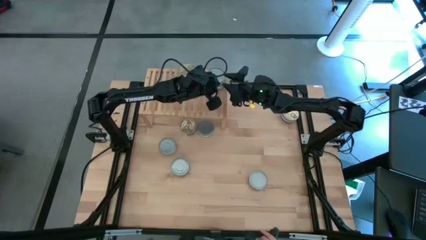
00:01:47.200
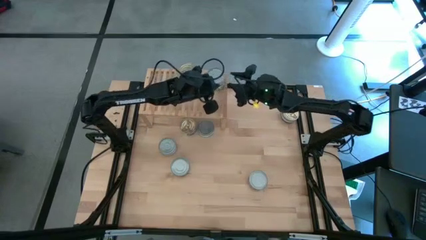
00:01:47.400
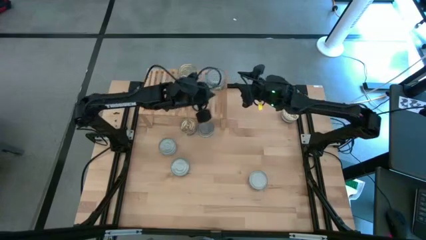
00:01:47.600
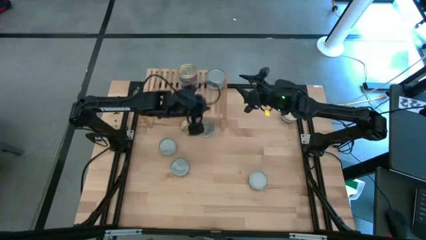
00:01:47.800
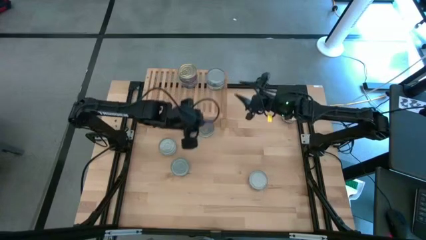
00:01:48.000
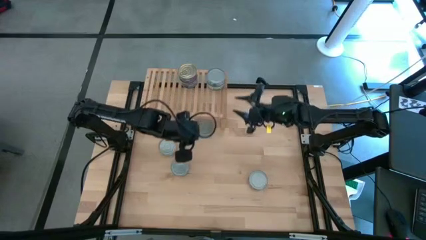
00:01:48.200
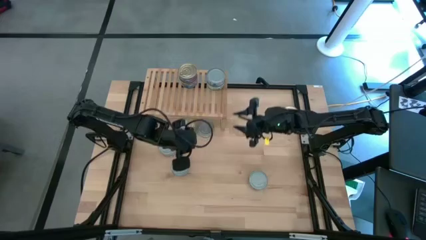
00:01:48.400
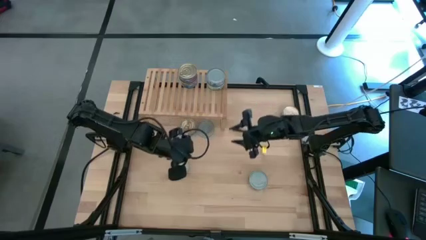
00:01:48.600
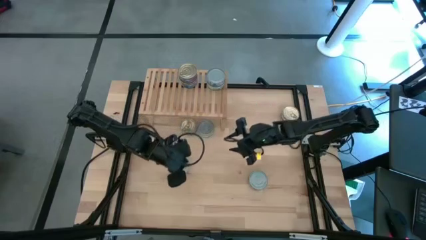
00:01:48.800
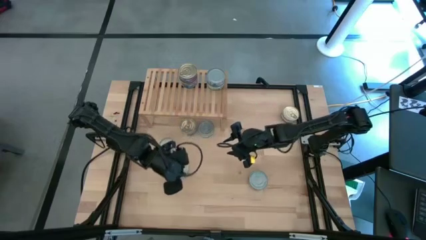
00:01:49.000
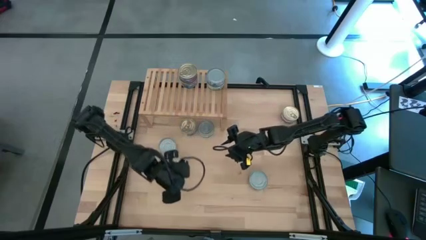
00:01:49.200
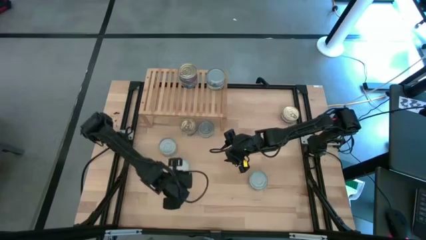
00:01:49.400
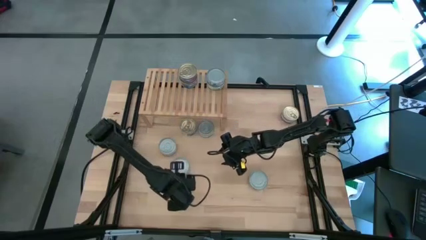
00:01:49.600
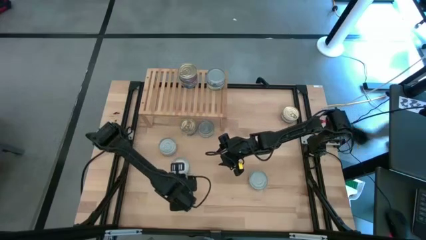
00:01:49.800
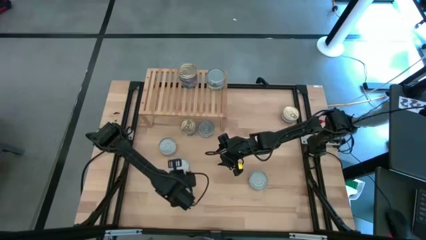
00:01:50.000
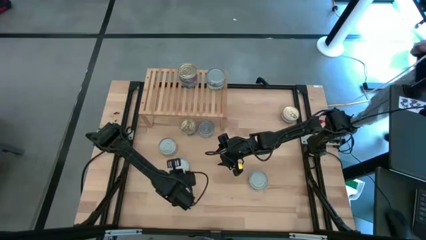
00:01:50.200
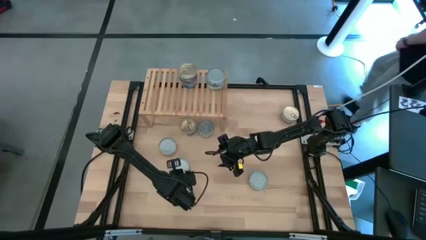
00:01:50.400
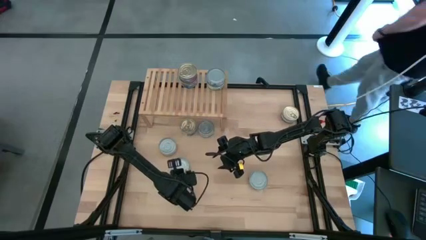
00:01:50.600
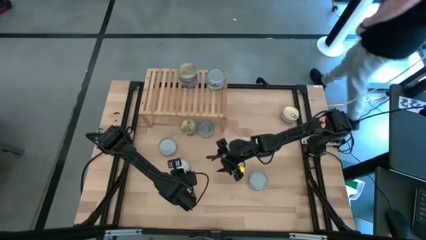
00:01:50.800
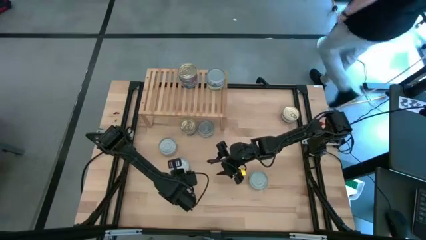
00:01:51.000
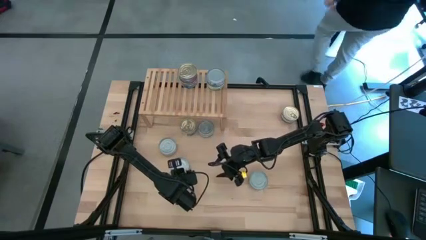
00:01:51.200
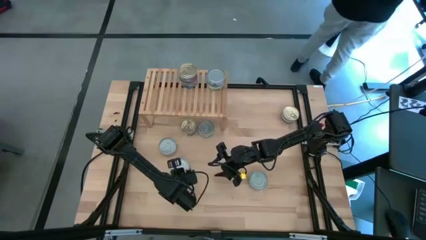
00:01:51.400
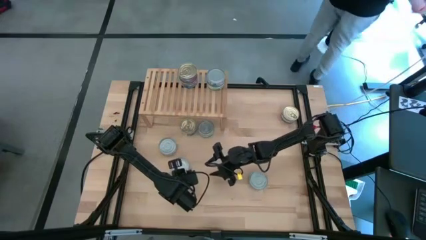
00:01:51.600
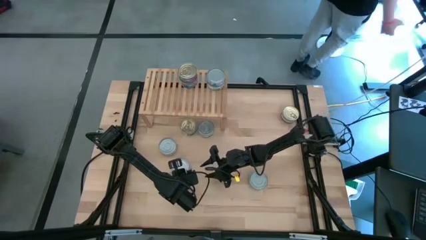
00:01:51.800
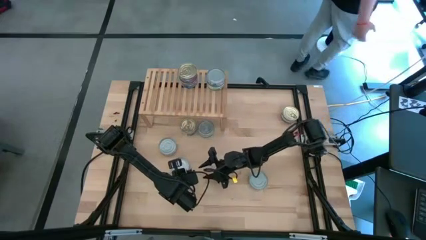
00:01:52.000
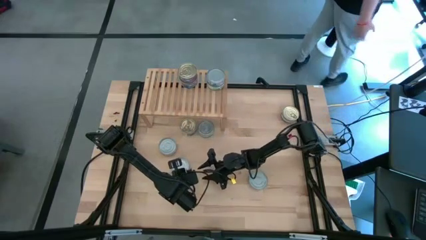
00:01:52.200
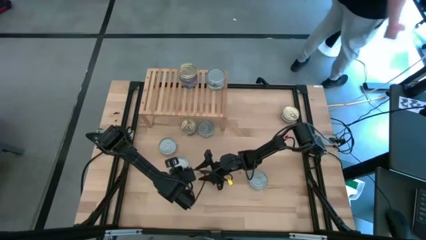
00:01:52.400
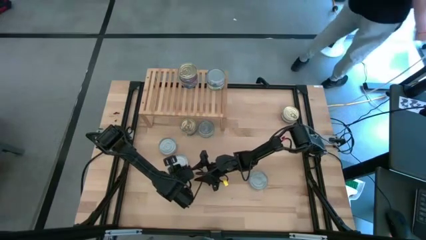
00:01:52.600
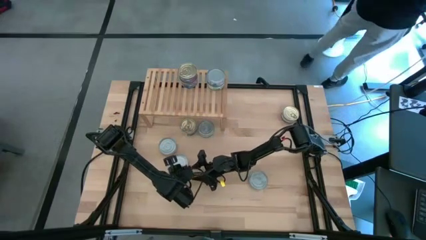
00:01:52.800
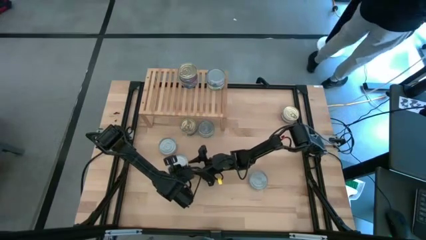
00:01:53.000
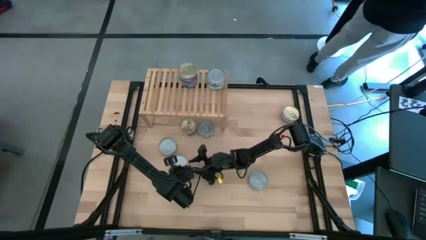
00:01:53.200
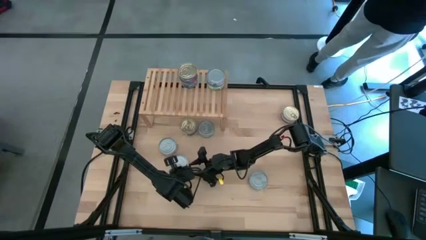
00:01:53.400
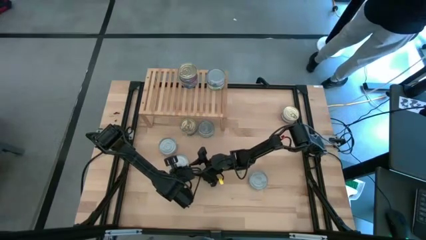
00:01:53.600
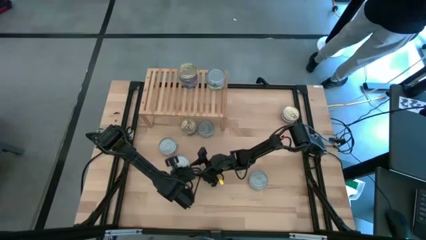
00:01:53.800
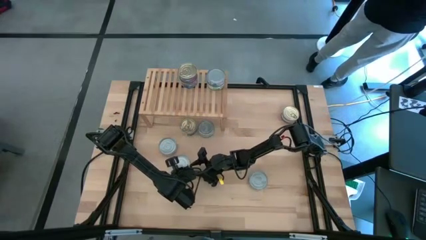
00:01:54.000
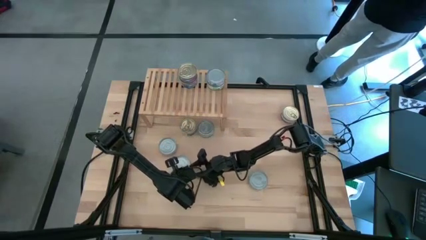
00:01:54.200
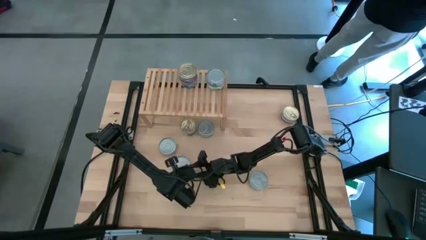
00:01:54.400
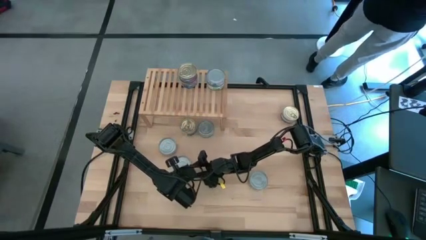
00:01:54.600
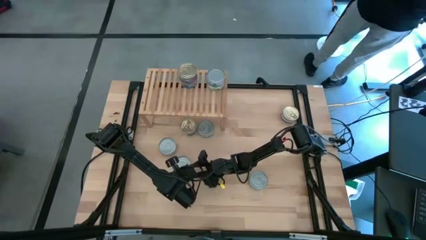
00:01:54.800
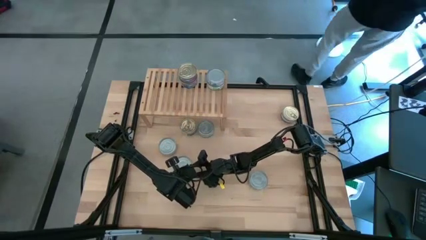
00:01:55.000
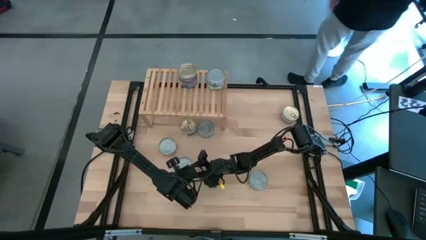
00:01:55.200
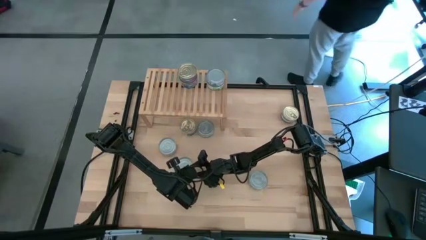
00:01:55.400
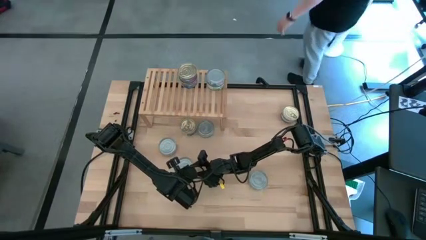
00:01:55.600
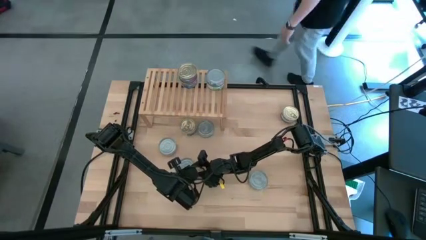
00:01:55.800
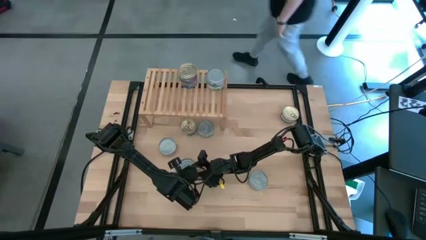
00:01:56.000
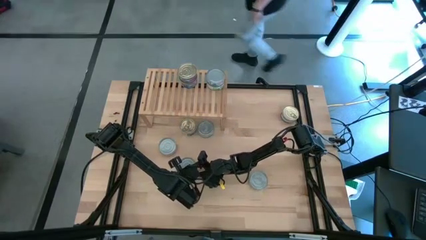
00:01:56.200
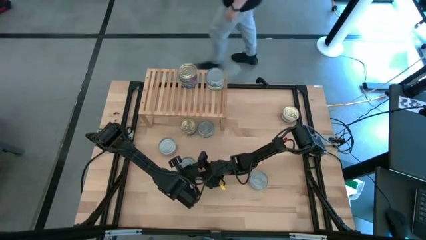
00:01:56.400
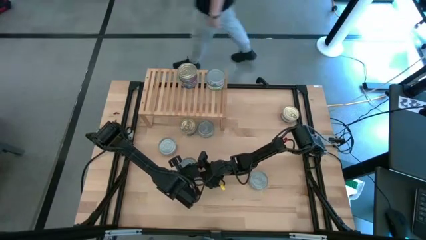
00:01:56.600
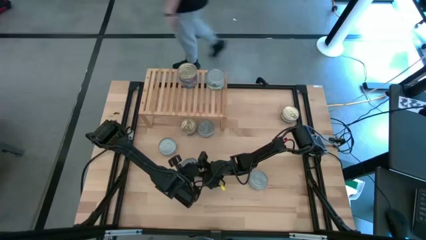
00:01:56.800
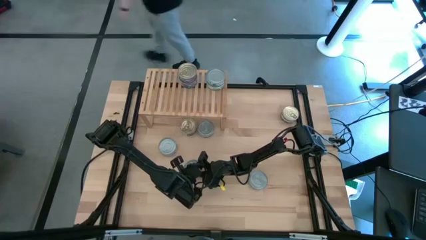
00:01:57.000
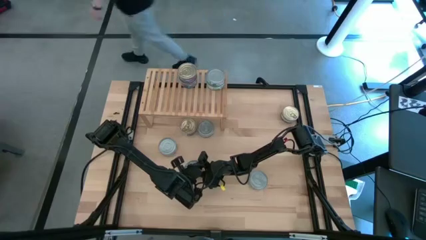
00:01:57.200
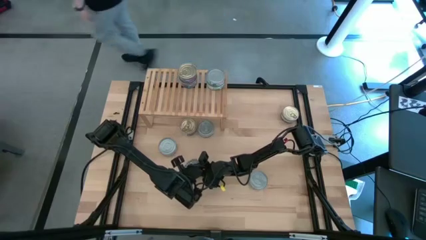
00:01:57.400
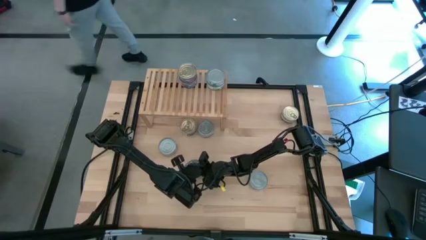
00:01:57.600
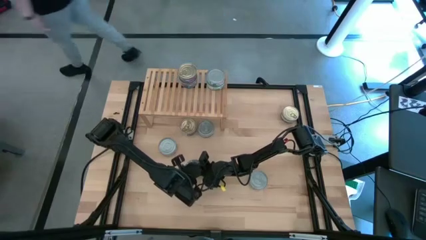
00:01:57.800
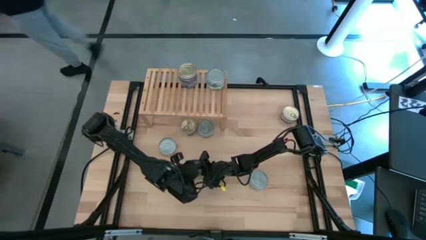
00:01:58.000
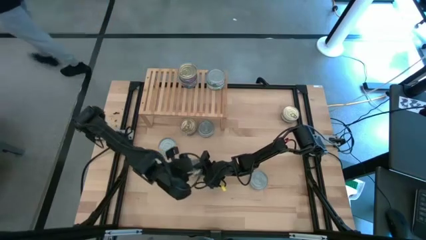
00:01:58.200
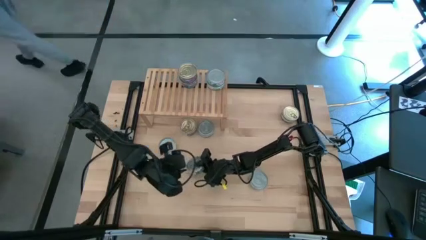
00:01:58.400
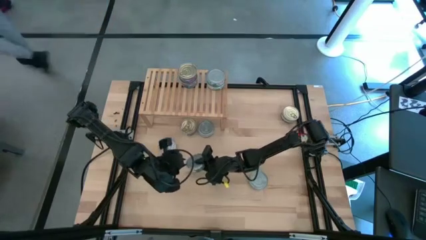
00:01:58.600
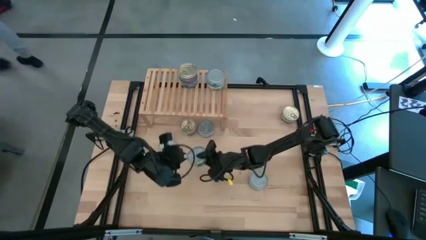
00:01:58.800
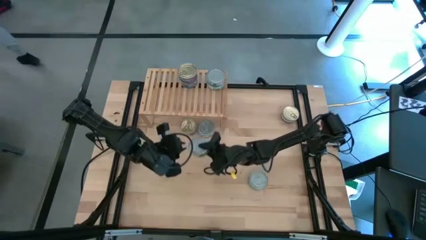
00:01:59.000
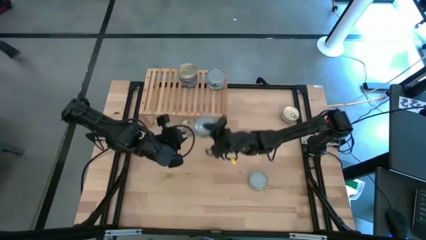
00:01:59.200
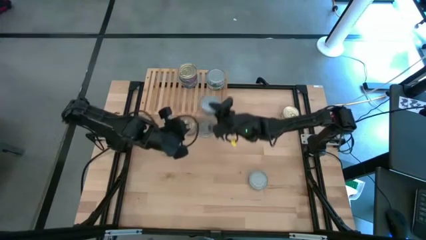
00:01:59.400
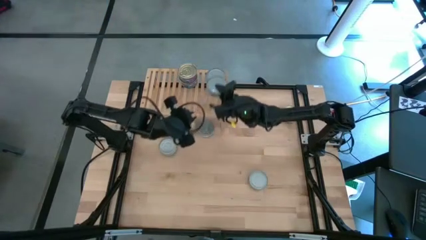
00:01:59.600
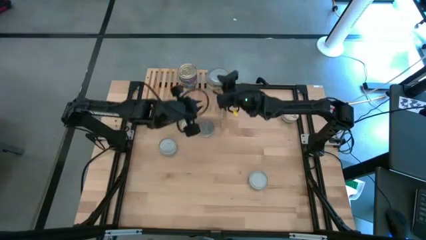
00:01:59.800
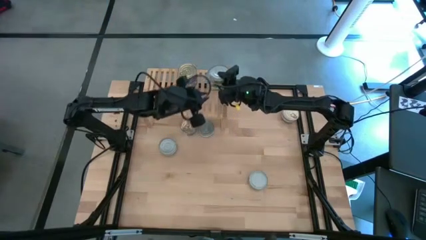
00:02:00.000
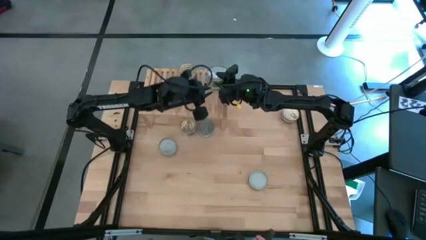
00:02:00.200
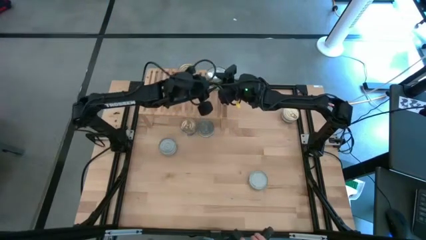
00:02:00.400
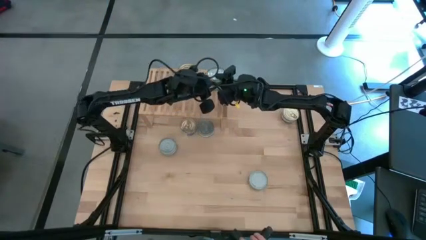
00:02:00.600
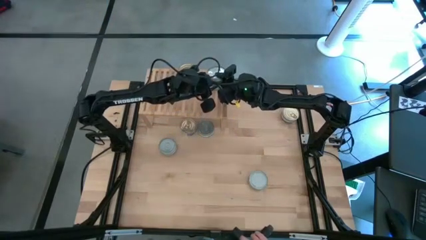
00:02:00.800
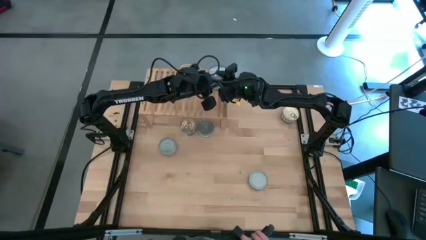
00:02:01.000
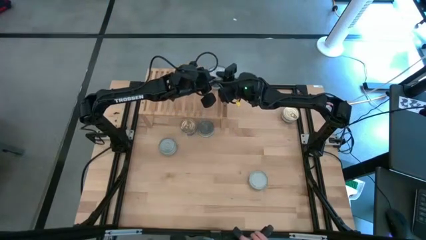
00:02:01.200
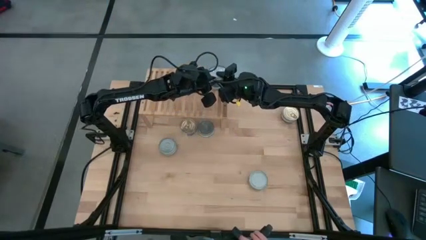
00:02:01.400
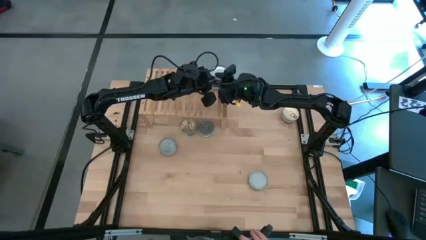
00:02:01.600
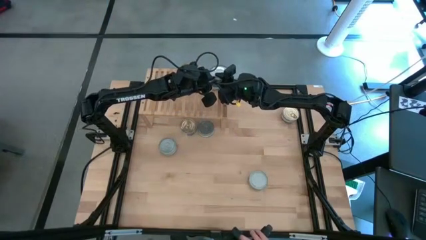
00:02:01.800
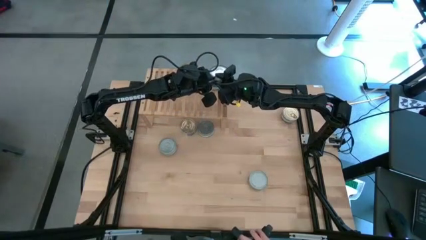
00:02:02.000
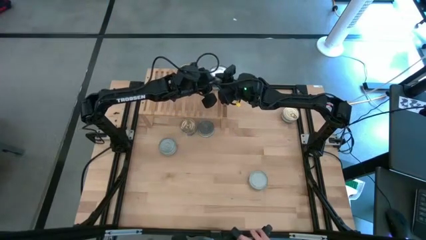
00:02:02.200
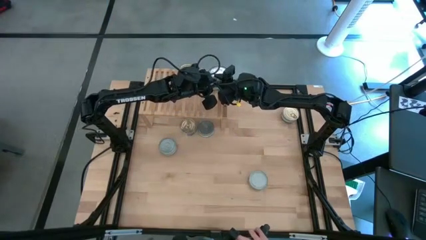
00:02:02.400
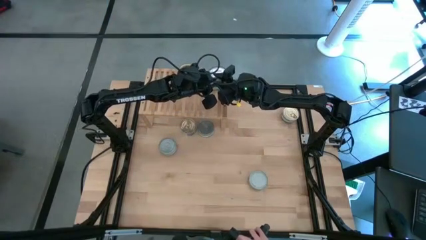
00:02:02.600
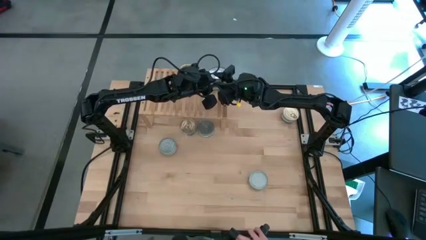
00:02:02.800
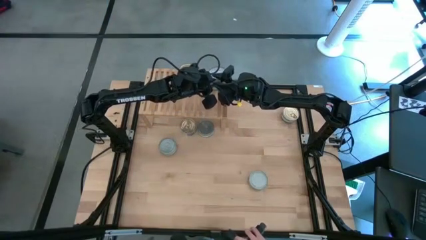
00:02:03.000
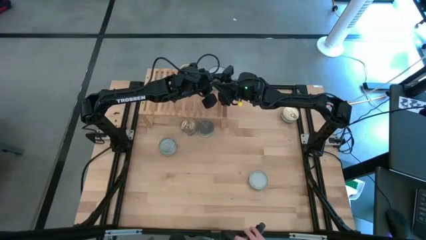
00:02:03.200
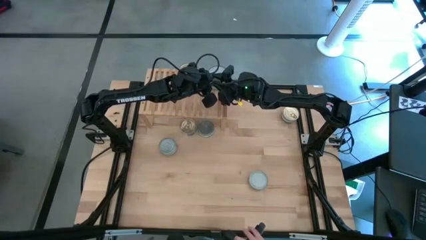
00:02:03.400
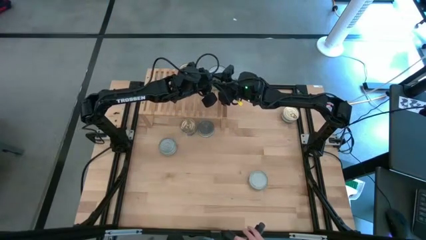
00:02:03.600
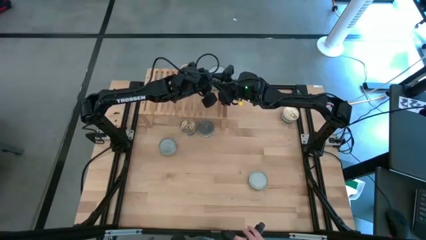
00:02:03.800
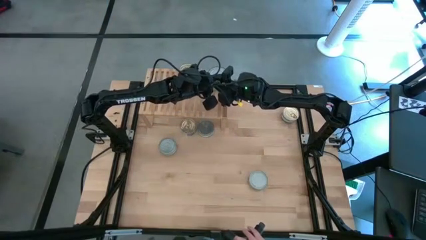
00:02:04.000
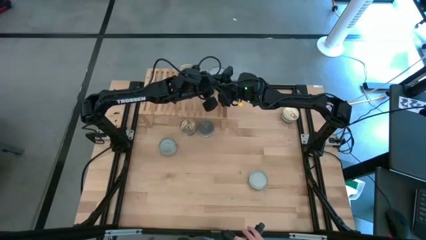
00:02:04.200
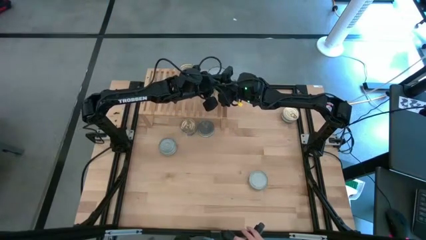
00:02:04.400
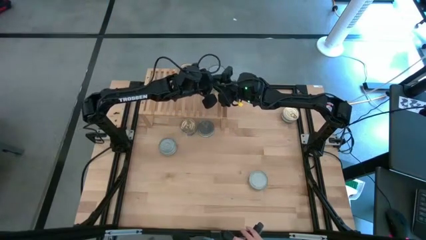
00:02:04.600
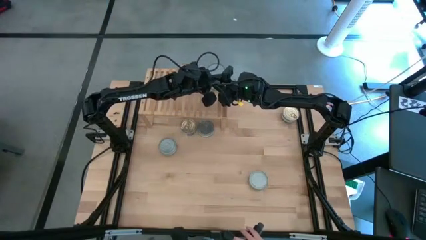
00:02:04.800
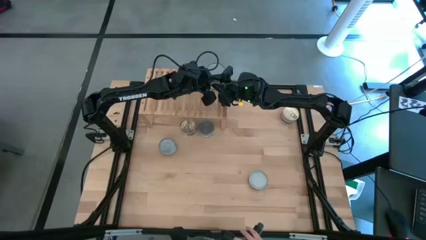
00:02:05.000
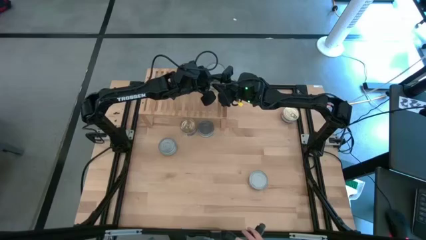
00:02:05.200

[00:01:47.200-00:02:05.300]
Task: Stack canned seafood by type on shelf
Stack the green tuna can on top of the stacked green tuna cans on the shelf
